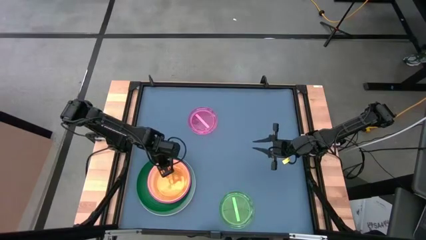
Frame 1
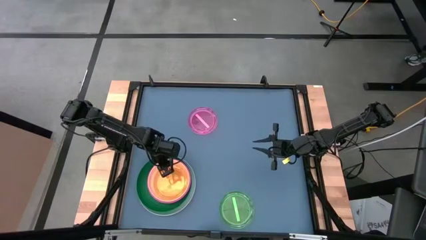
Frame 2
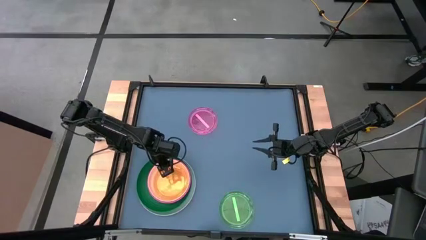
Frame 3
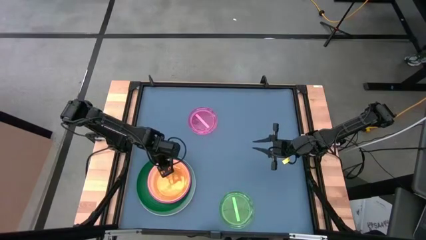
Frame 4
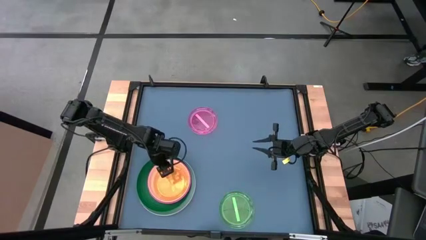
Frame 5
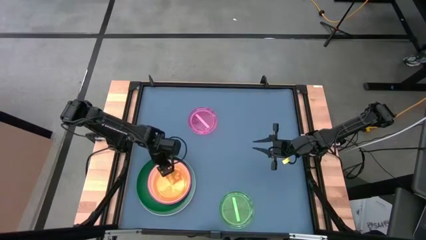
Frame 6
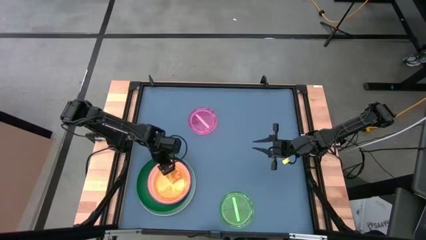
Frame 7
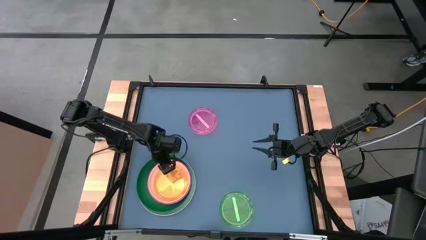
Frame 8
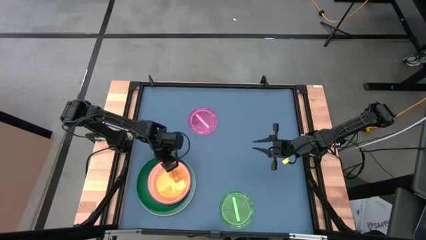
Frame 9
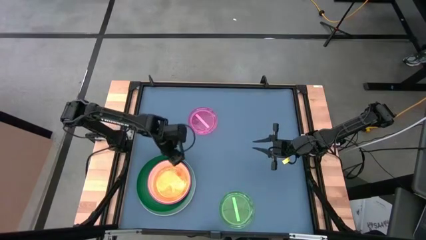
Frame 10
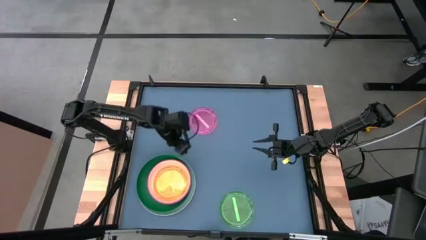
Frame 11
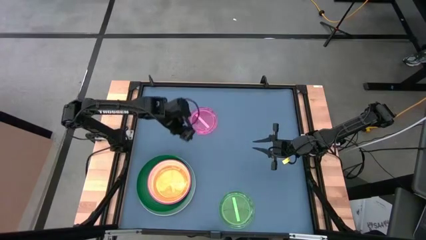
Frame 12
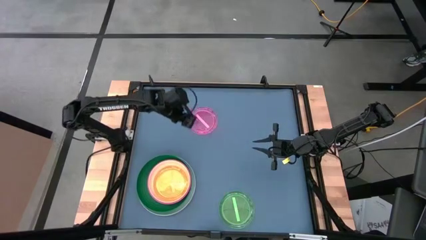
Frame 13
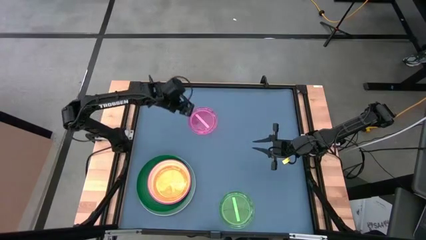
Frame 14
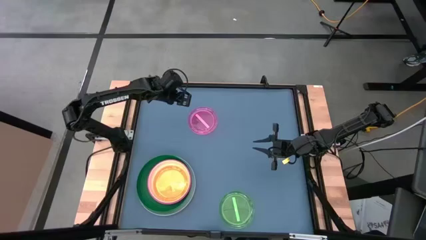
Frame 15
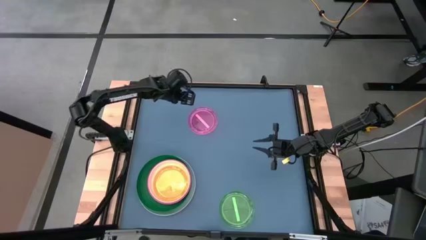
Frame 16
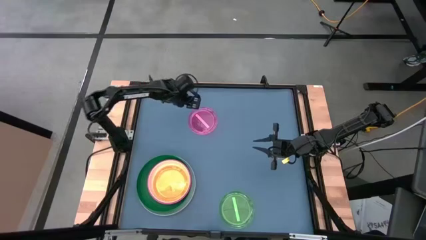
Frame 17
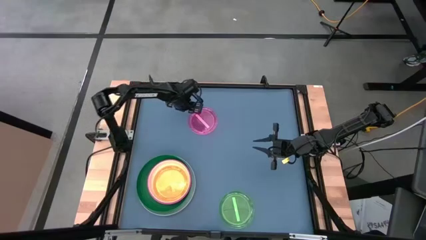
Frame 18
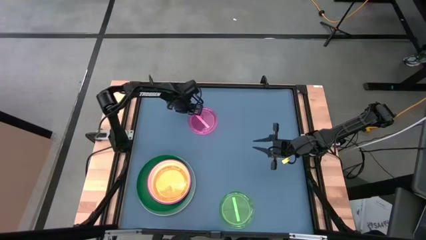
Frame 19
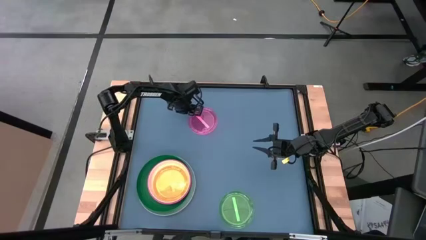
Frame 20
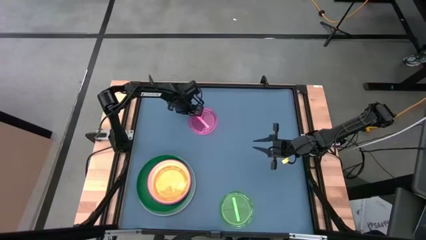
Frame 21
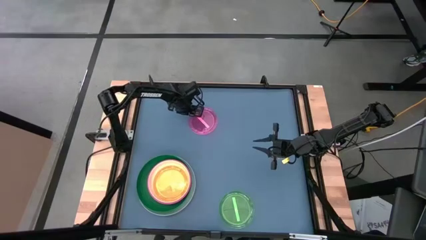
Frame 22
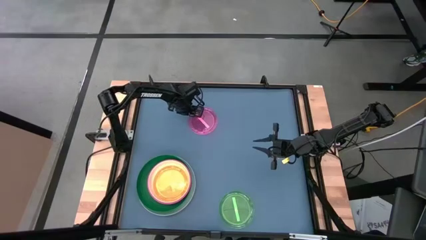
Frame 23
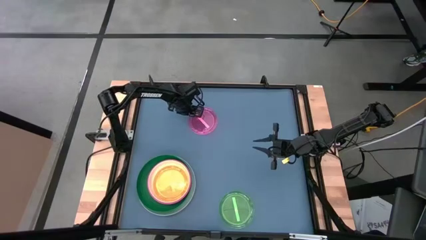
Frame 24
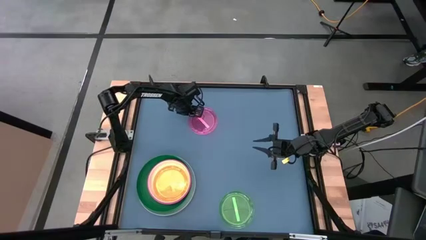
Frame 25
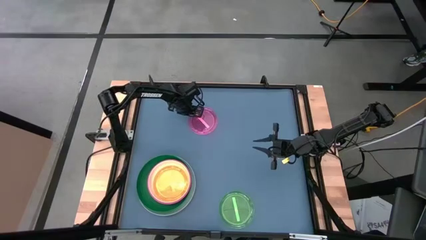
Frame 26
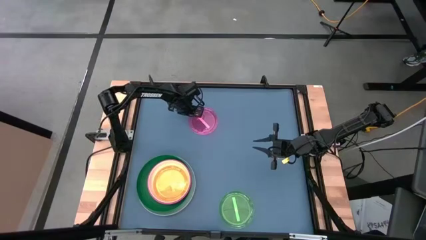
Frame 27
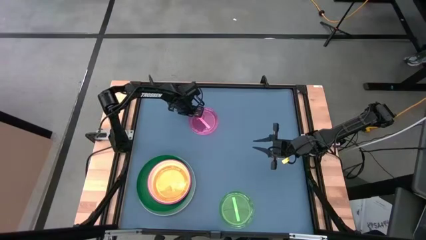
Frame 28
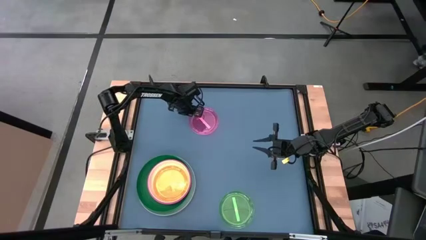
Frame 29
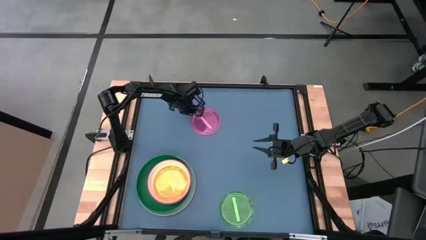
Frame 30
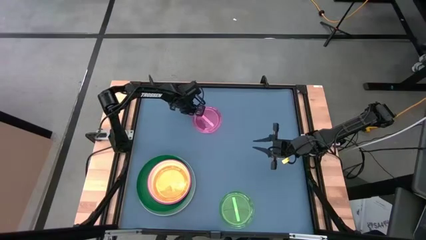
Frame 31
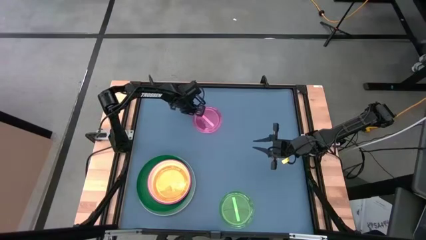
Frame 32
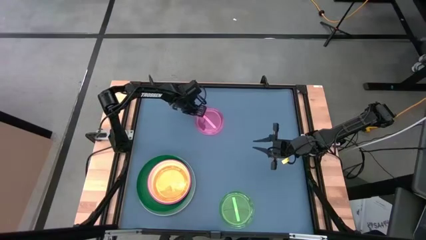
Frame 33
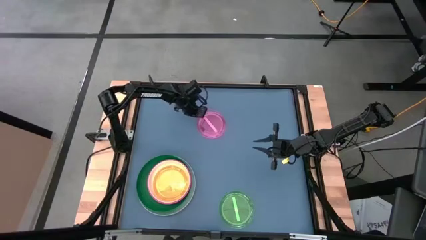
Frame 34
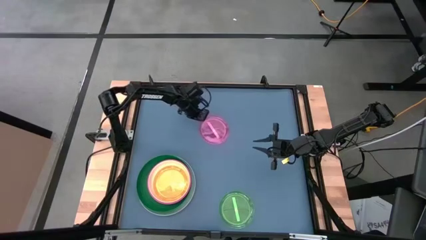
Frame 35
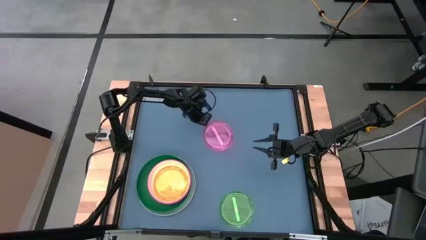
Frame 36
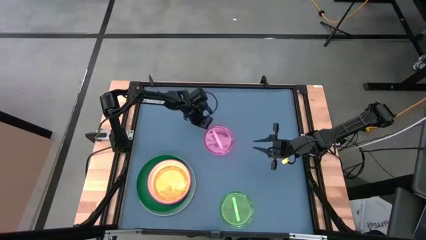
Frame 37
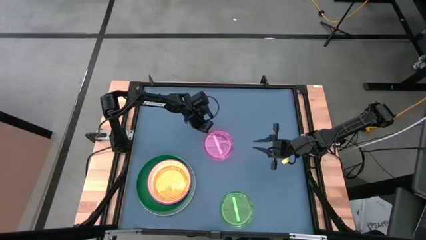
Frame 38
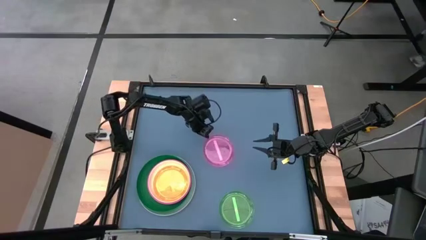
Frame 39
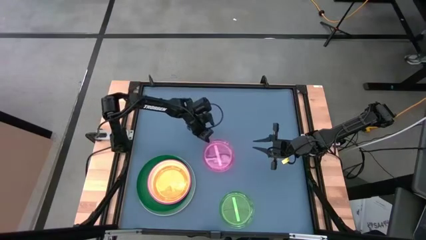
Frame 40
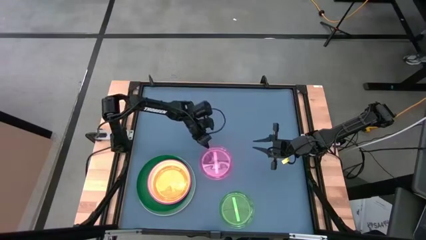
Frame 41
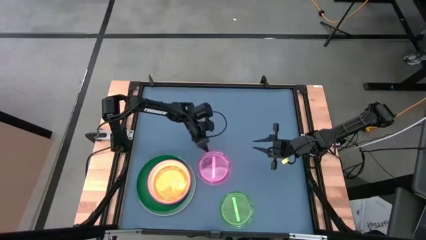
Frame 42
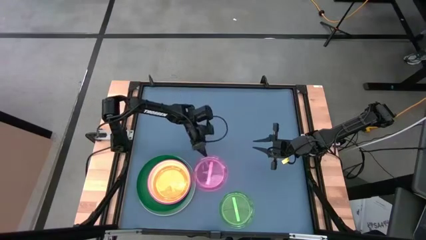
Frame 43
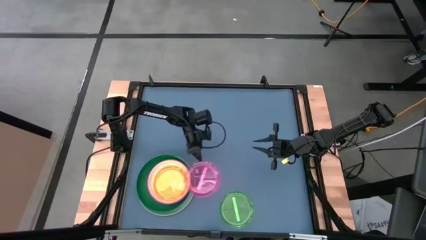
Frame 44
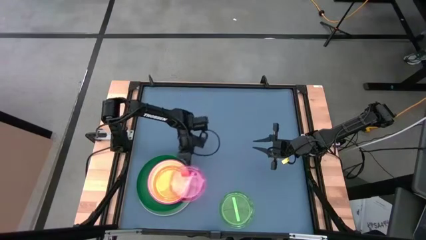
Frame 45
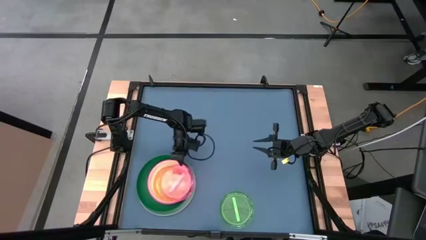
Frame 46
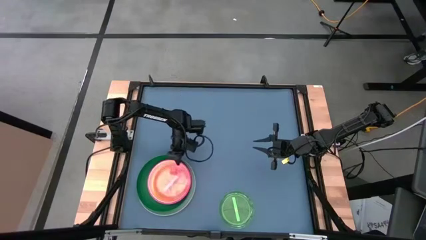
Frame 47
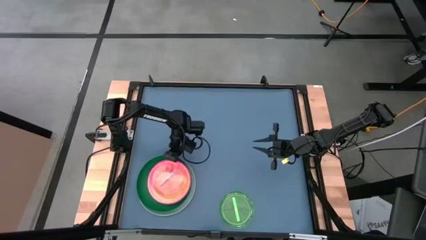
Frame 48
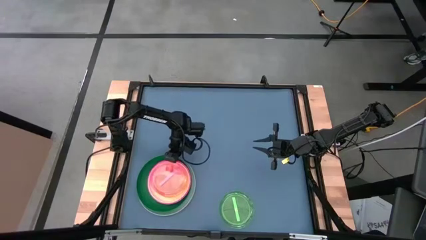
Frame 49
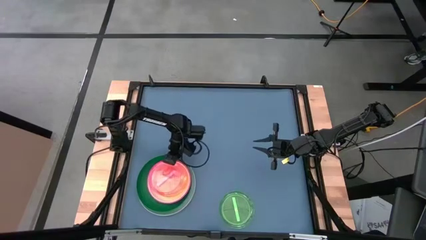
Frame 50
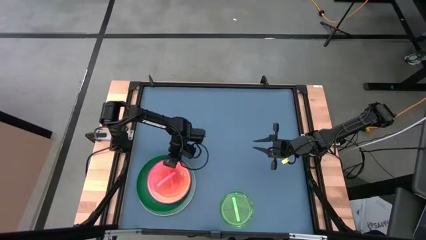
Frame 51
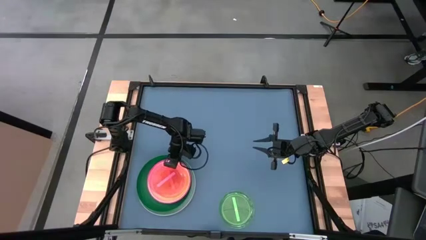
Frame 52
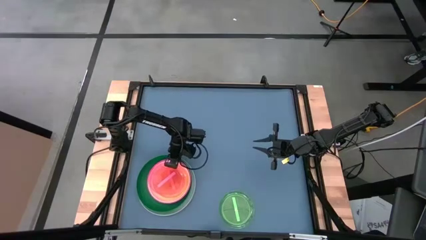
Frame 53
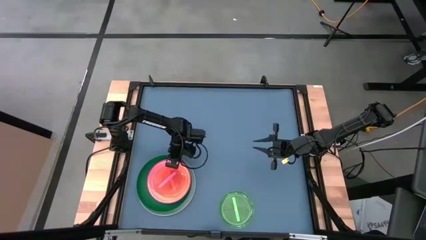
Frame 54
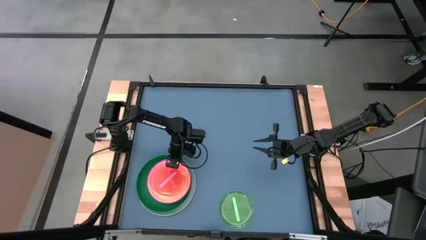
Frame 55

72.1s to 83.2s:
Task: Stack plastic plates
Stack the pink plate on top of the orange plate

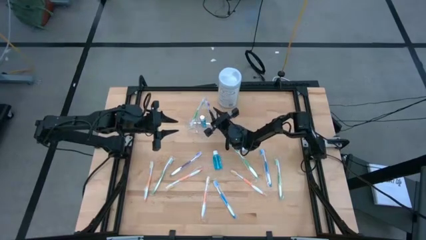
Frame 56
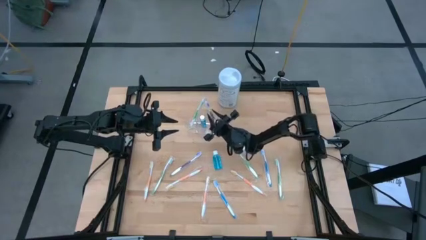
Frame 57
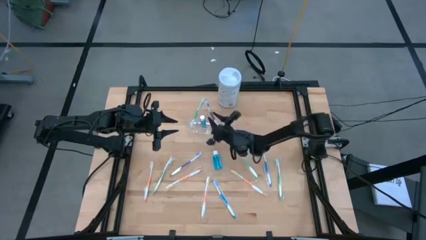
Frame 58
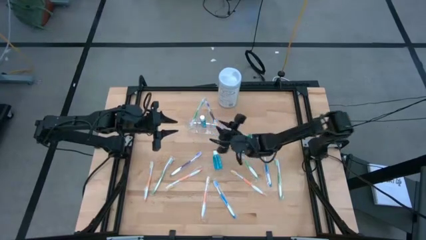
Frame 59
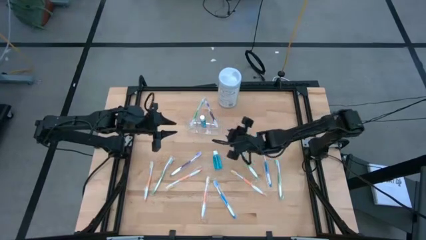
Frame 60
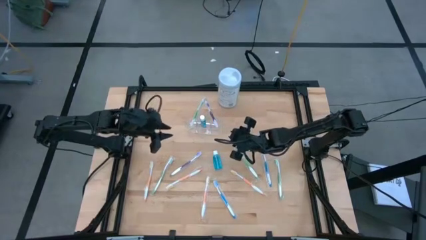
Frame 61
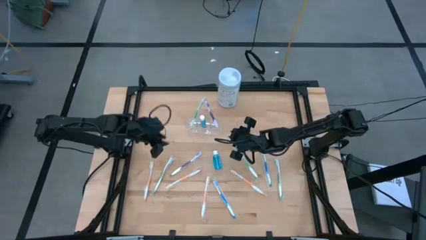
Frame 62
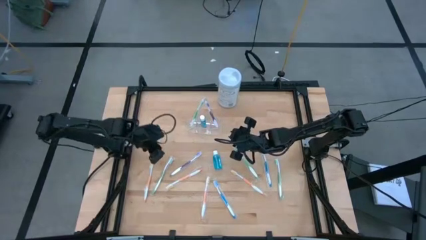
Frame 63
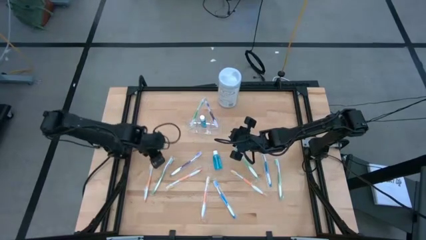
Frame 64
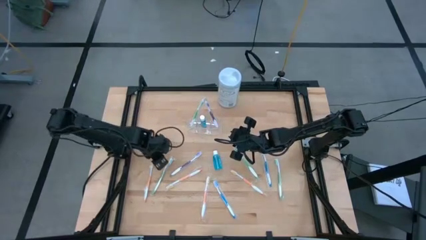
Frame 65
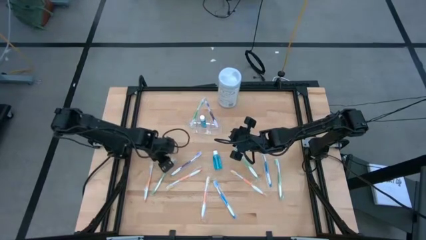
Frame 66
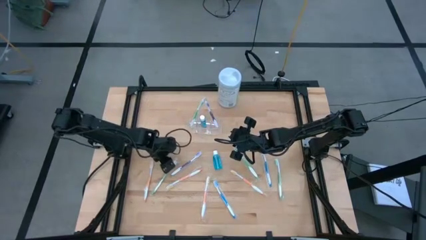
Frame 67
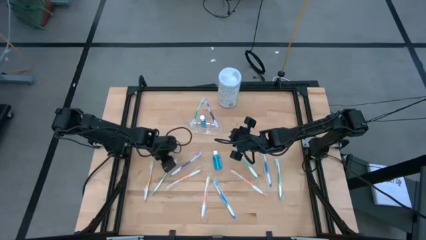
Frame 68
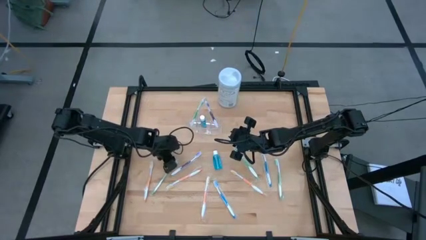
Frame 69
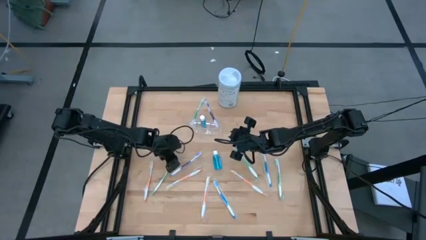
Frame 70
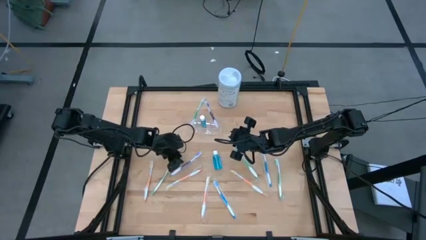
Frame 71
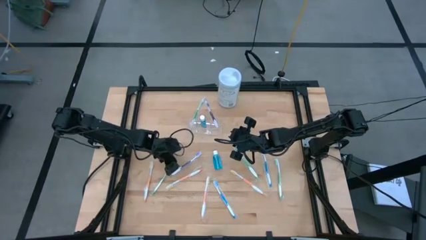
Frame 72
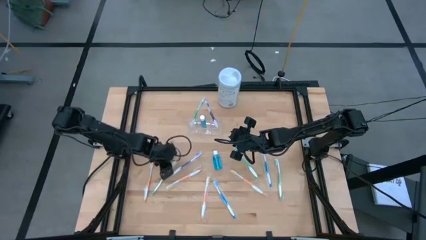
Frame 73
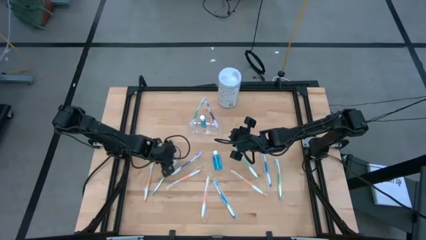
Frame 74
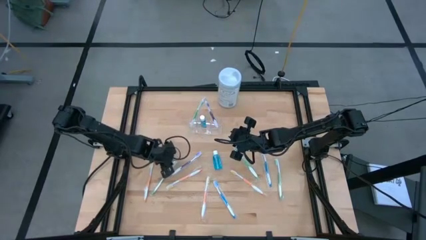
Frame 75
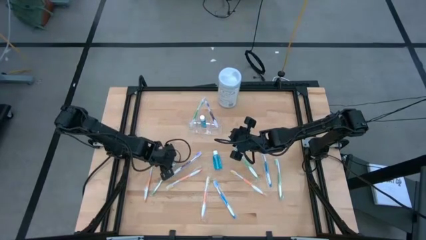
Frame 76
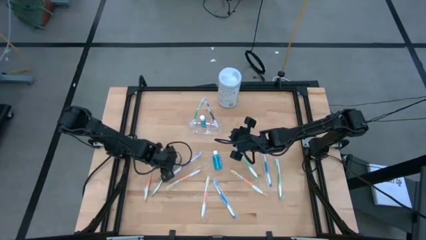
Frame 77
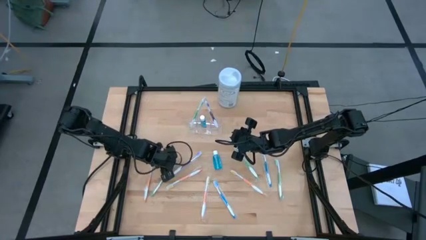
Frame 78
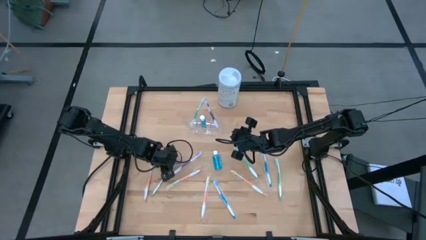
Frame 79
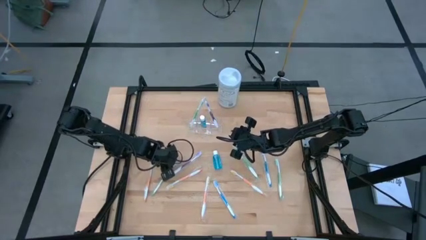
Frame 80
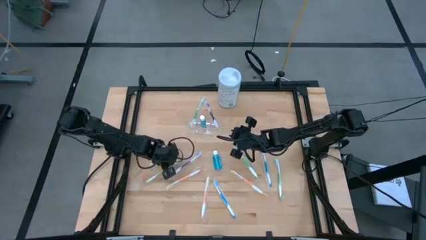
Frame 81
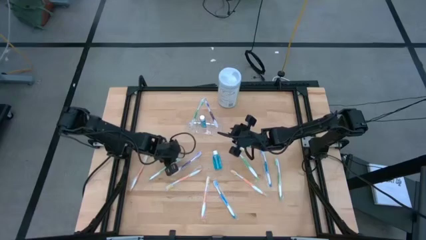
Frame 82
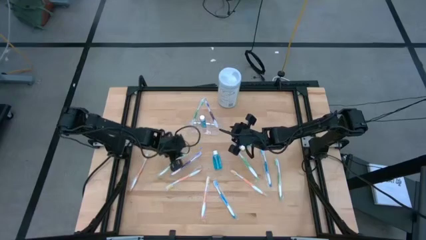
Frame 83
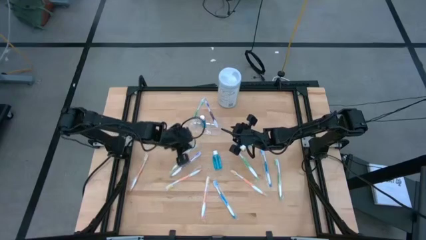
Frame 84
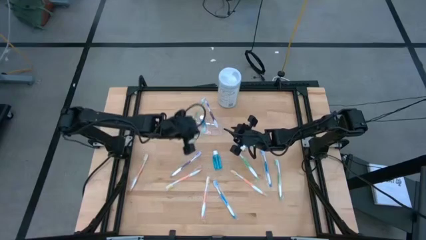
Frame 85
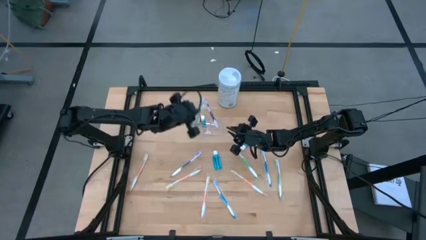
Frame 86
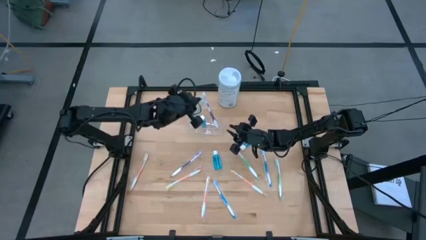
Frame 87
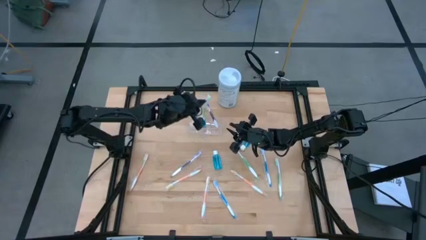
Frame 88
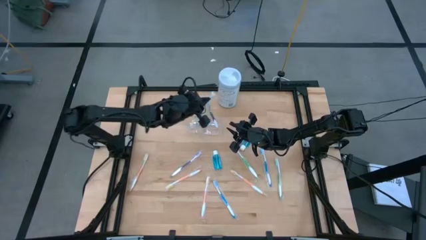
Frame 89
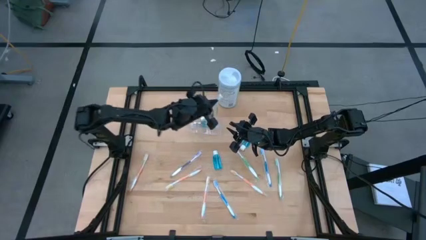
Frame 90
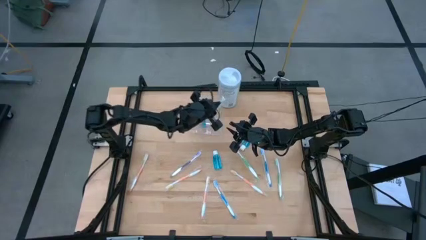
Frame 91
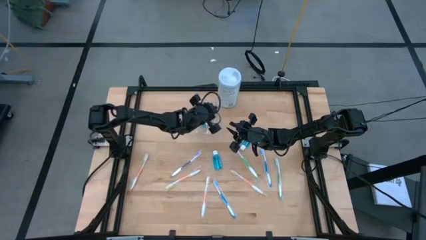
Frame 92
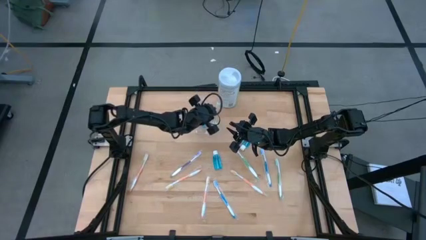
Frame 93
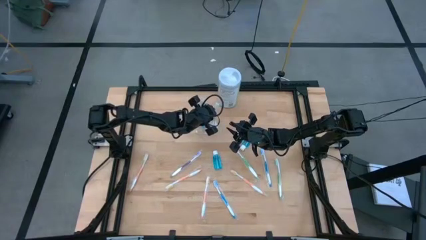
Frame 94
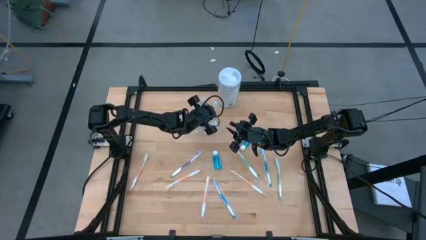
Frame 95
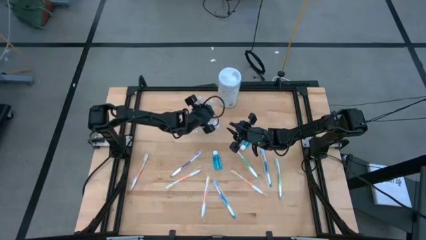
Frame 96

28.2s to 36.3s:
Task: Pick & Place toothbrushing station
Put the green toothbrush into the transparent organizer
